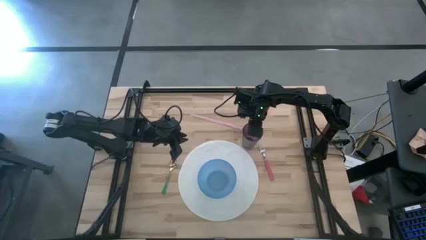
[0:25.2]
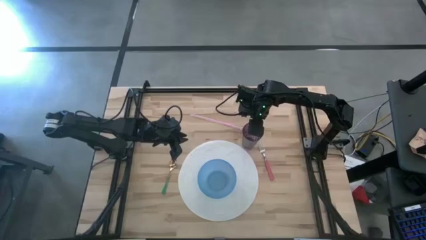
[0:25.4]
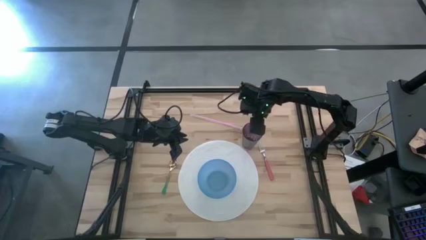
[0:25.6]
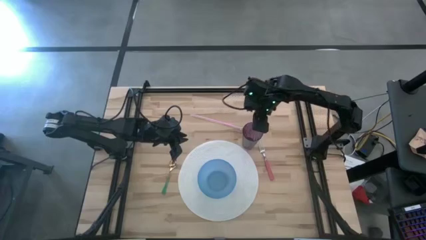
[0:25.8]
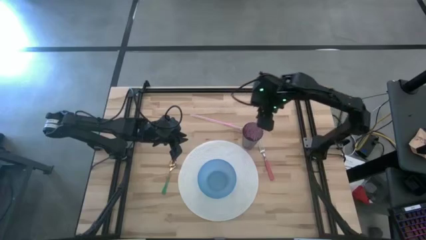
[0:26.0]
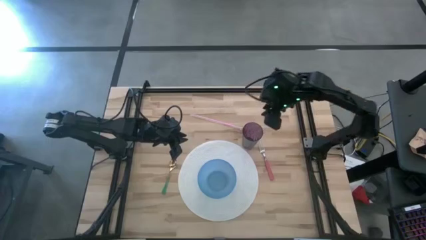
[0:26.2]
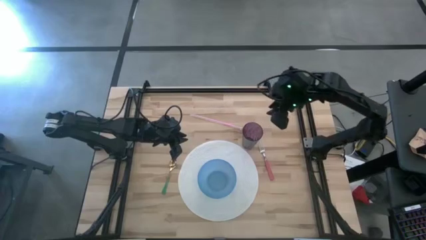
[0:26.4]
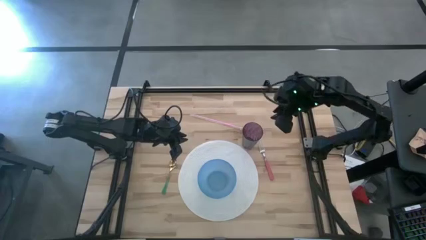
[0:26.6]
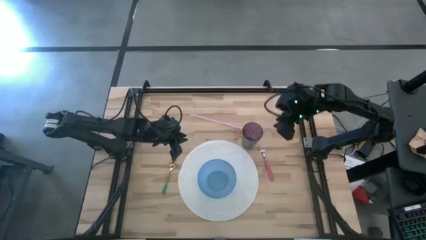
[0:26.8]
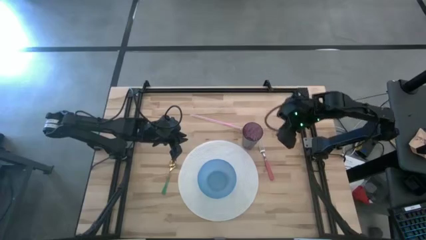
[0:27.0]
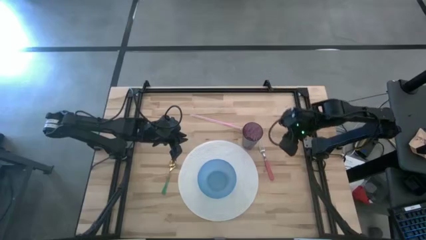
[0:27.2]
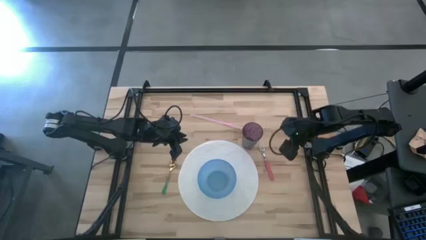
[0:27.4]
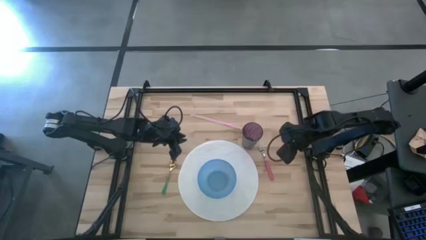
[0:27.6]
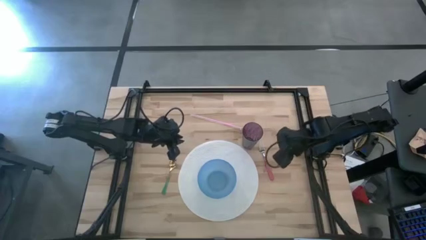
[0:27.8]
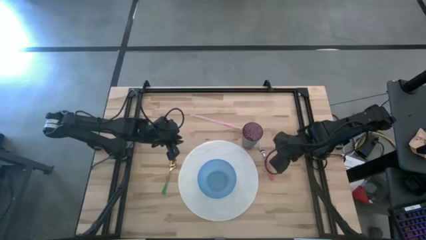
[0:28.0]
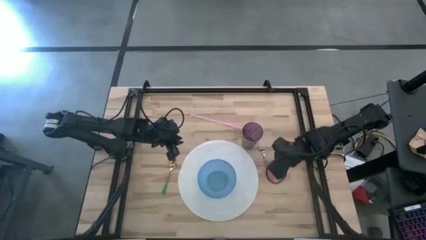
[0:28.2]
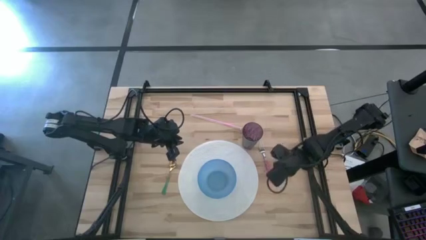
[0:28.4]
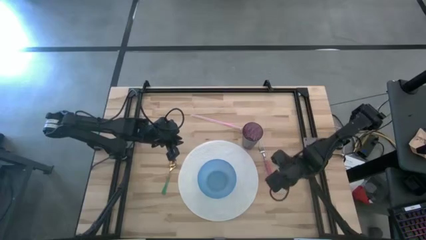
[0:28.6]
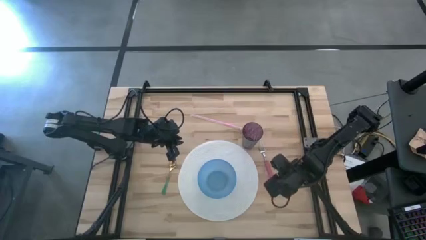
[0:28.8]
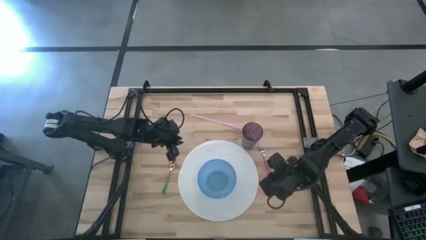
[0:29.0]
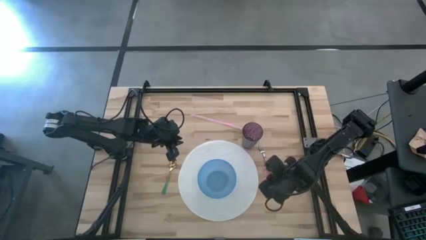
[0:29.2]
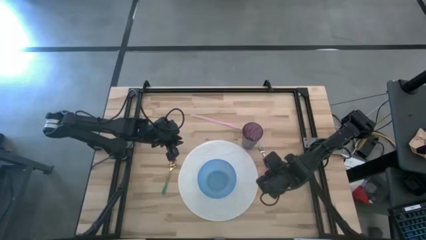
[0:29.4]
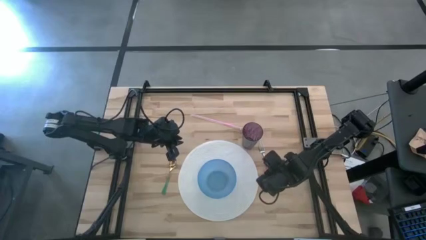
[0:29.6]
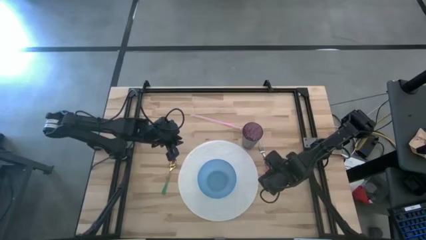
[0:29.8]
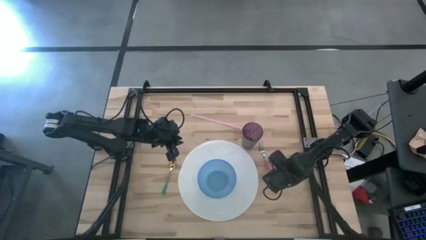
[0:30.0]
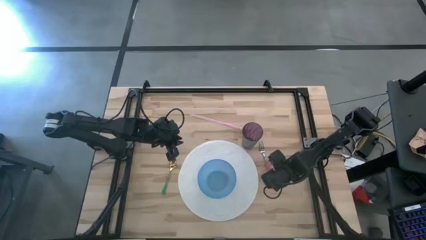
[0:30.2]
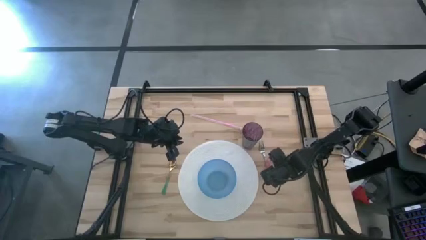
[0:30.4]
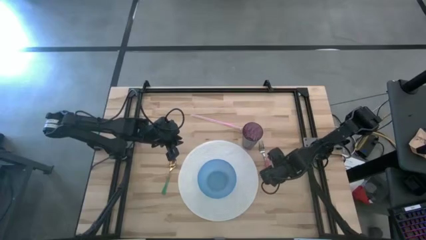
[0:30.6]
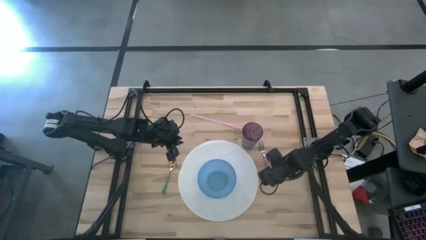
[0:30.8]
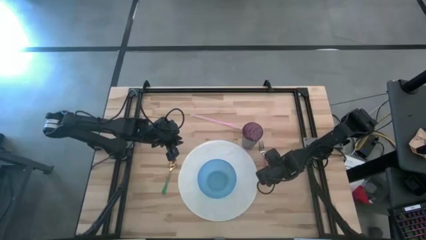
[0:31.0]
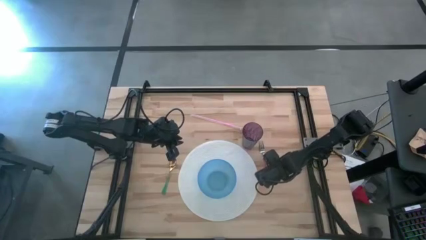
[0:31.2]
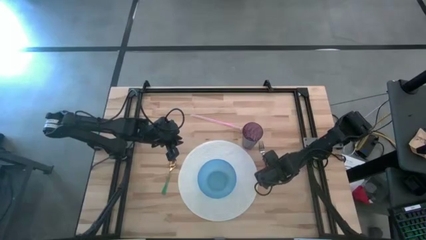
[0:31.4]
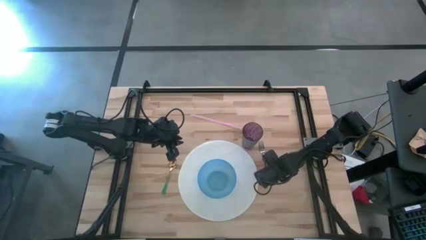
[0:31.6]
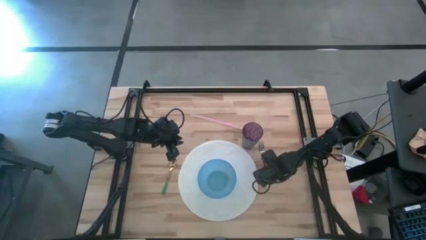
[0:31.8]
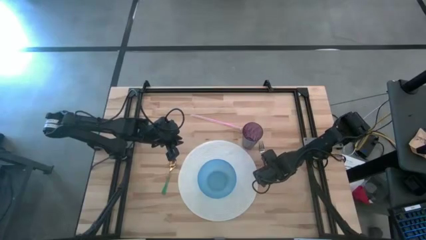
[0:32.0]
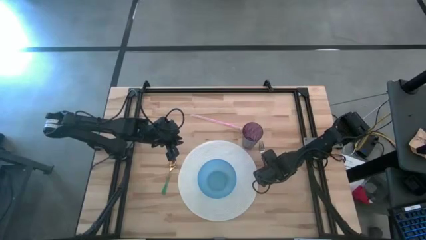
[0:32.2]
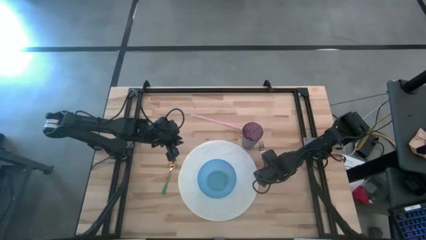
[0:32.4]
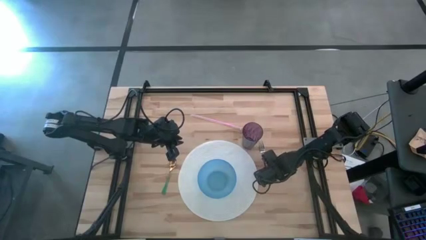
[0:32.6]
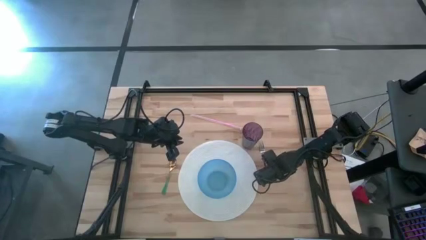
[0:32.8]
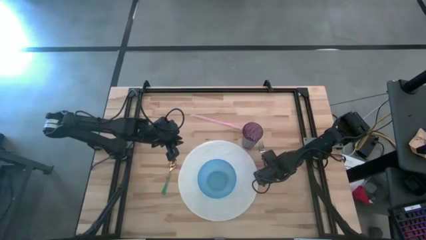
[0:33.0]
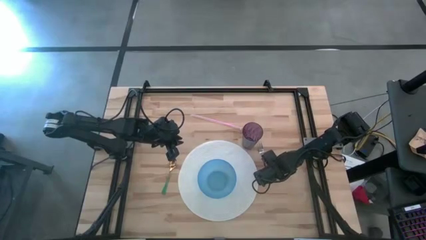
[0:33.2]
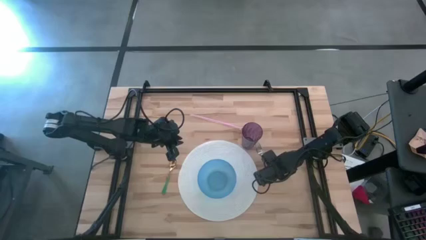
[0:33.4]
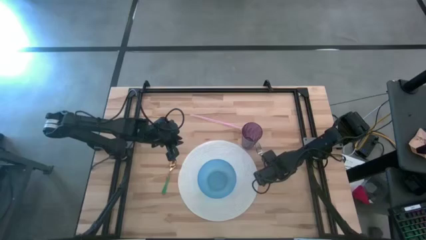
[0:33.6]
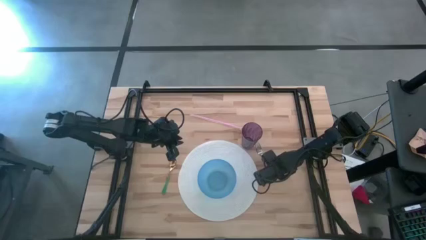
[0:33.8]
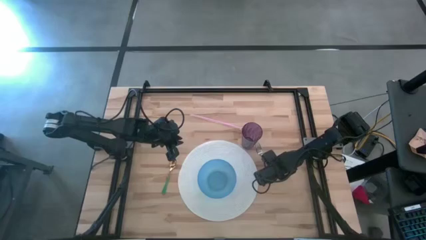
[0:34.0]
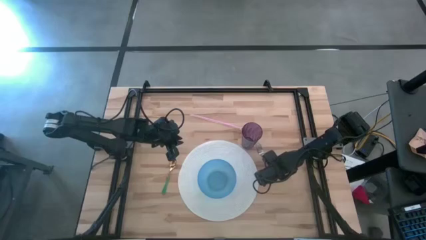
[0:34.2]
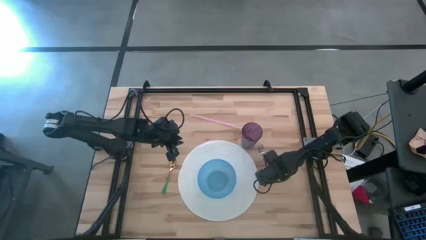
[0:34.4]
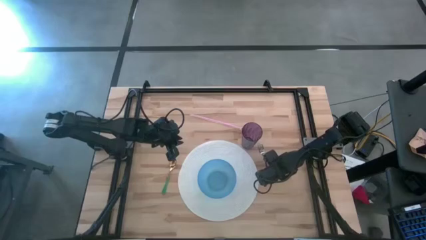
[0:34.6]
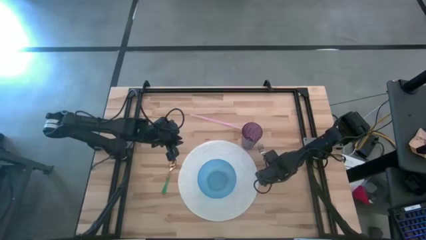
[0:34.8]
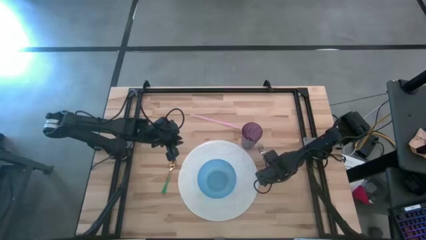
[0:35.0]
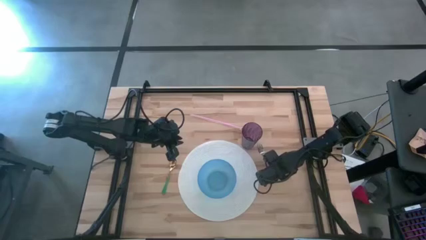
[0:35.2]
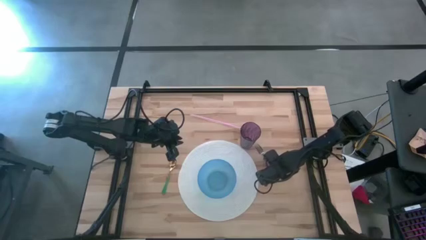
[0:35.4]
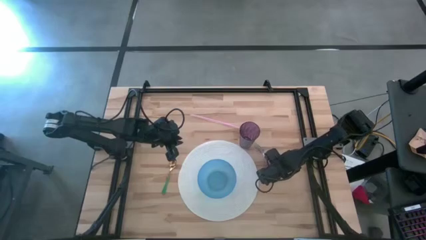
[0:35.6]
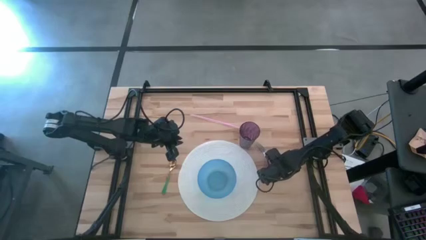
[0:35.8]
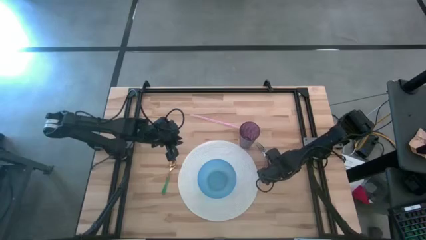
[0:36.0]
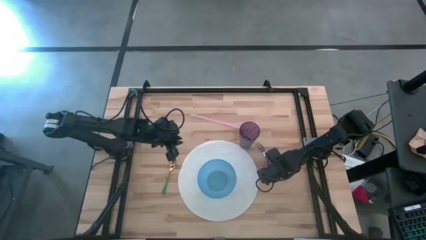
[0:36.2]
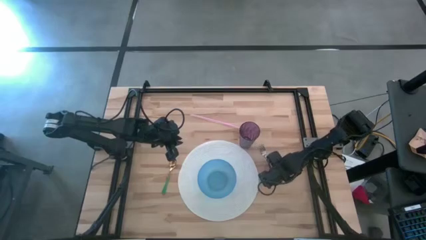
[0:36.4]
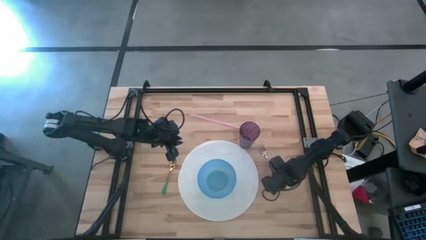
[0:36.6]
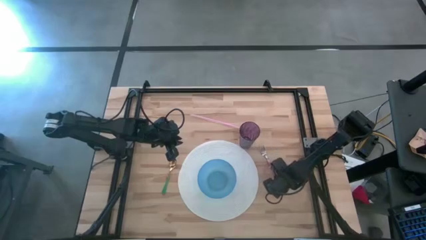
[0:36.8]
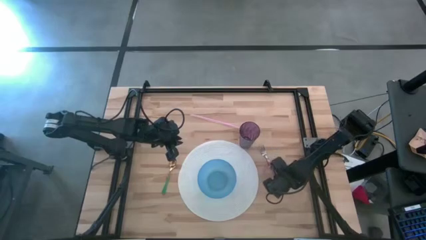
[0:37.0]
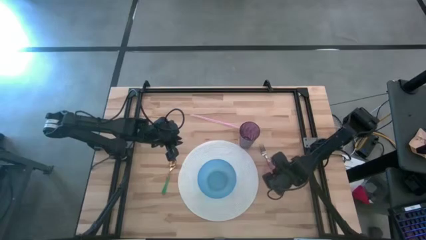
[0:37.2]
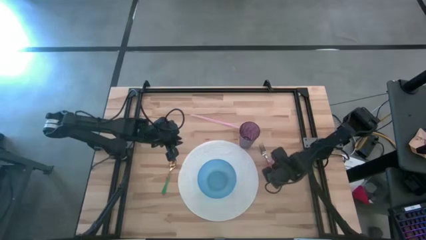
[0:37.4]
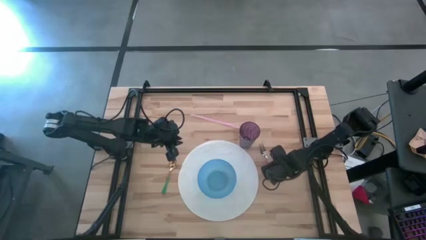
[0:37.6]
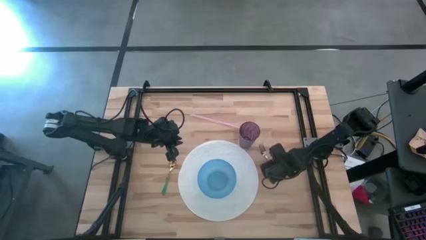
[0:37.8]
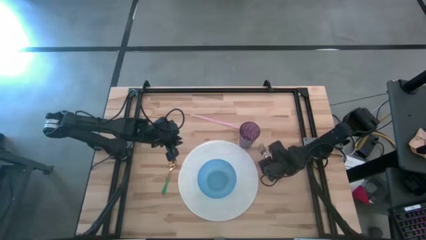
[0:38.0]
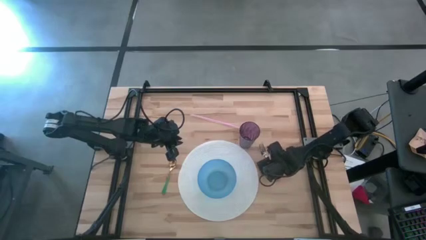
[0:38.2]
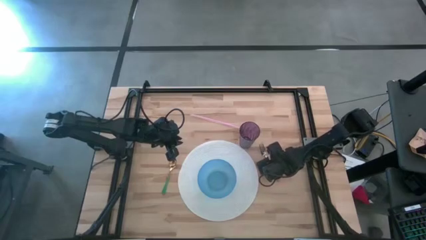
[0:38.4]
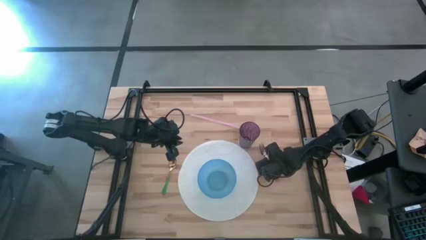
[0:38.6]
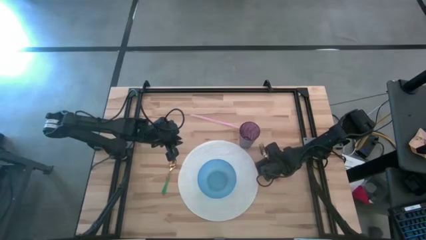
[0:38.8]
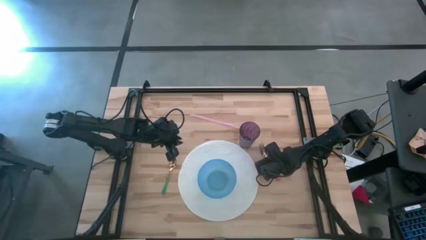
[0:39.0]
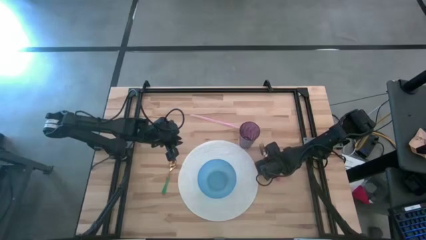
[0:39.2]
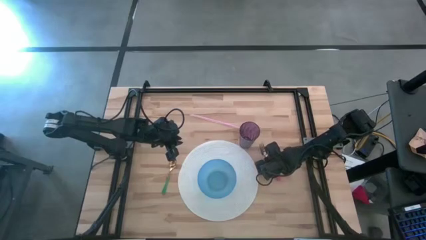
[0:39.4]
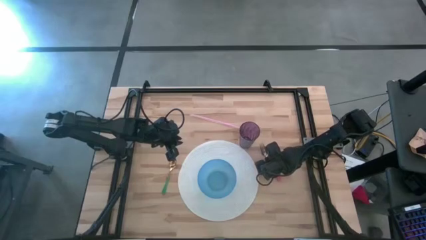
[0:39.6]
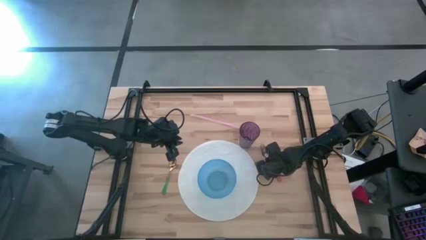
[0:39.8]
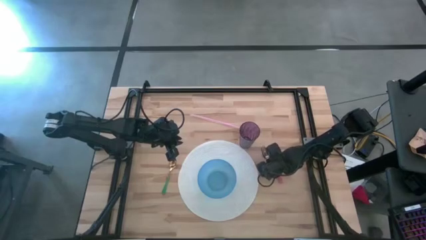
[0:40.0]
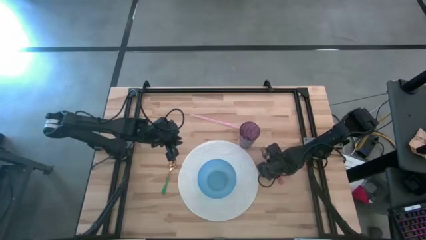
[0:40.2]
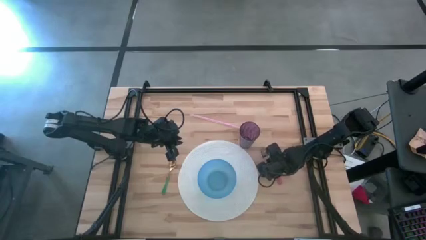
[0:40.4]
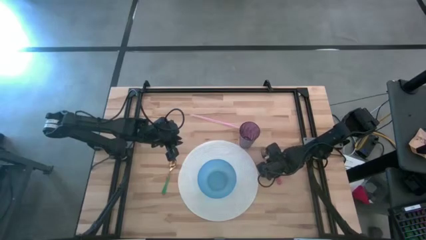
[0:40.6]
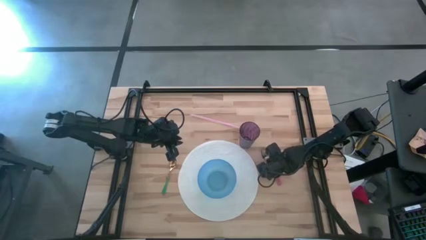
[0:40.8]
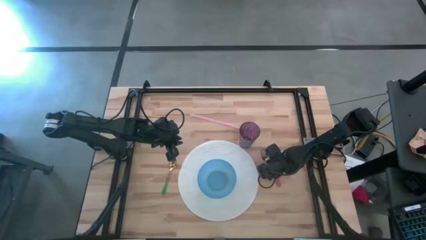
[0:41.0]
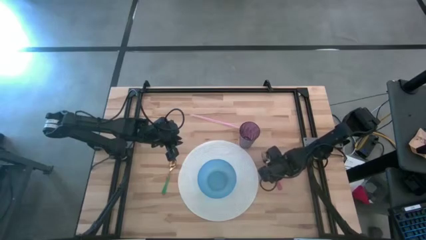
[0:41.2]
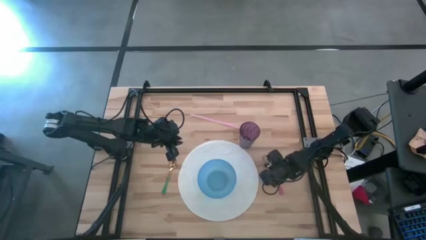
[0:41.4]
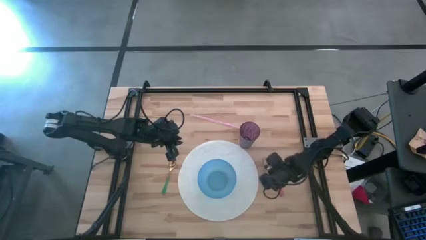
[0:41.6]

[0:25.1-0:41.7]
Task: Pick & Place Utensil
Put the pink fork in the blue bowl

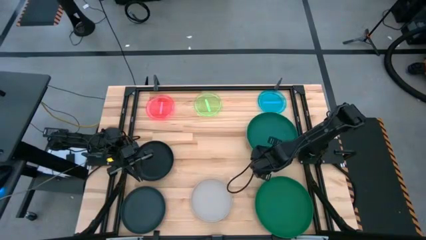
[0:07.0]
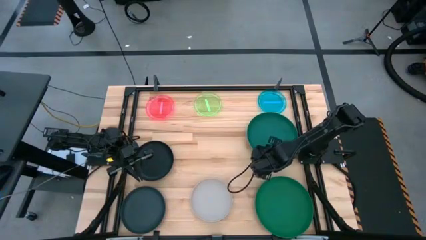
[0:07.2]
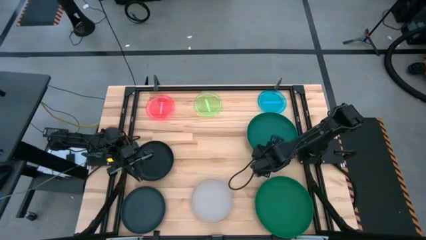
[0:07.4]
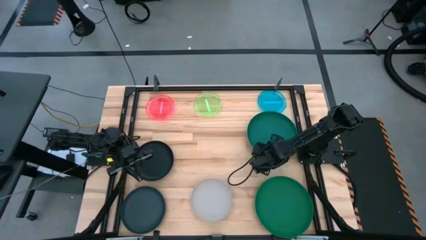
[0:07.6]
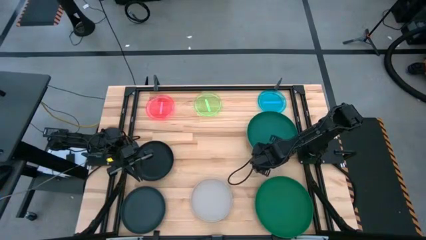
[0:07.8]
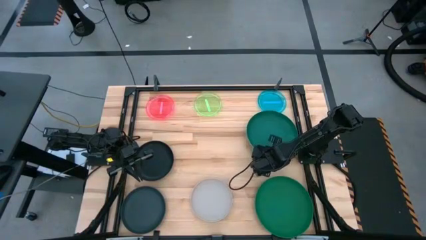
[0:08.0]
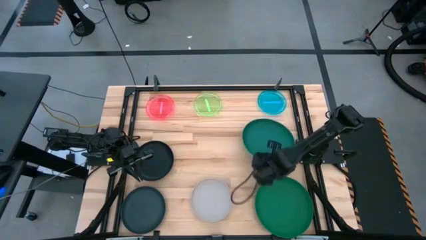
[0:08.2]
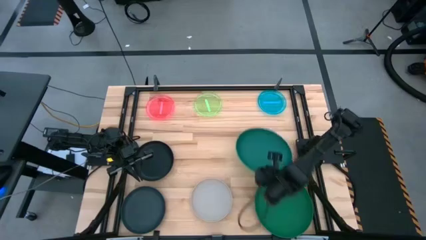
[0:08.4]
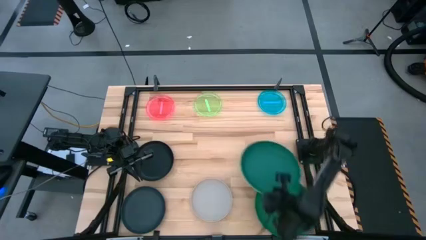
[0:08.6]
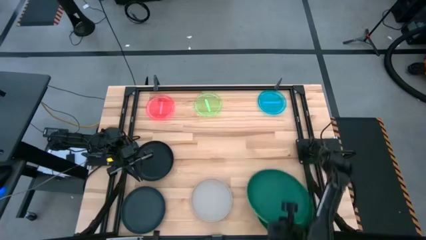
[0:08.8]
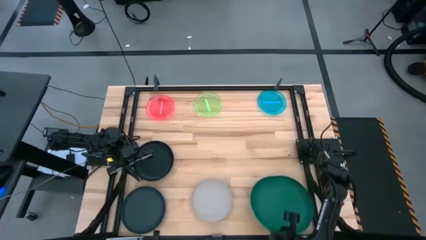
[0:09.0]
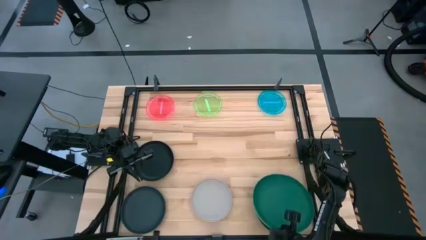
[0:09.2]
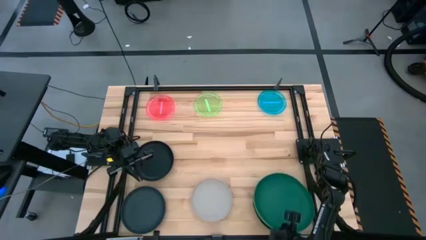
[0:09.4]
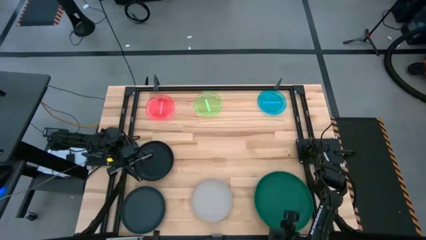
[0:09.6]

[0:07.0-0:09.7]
Task: Stack plastic plates
Stack the stacked plates on the green plate
